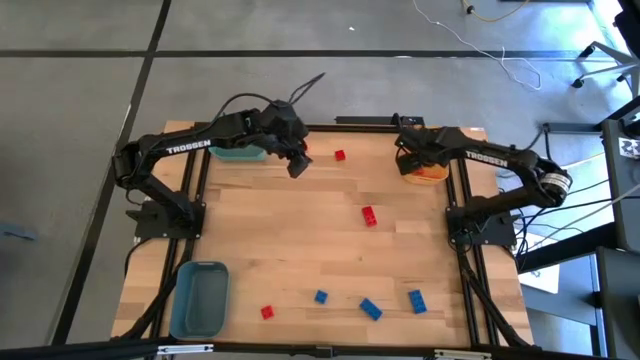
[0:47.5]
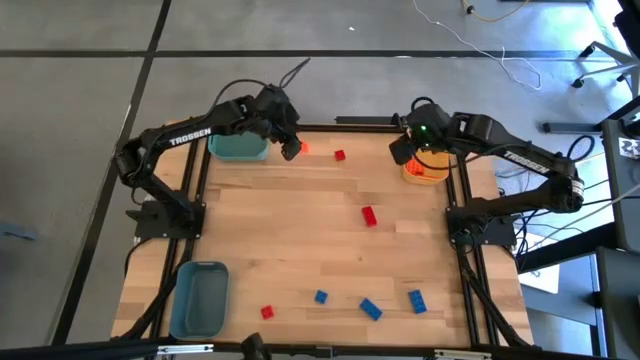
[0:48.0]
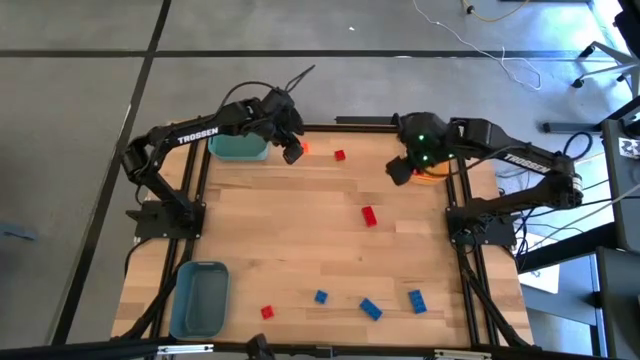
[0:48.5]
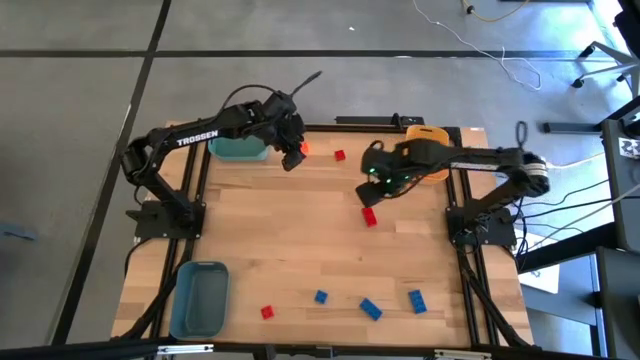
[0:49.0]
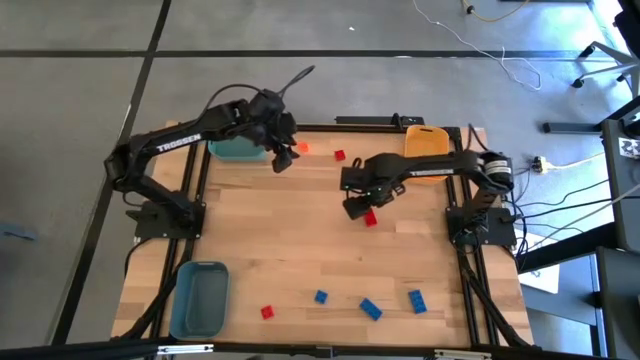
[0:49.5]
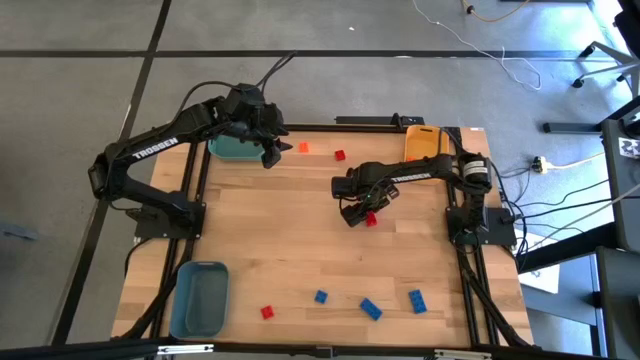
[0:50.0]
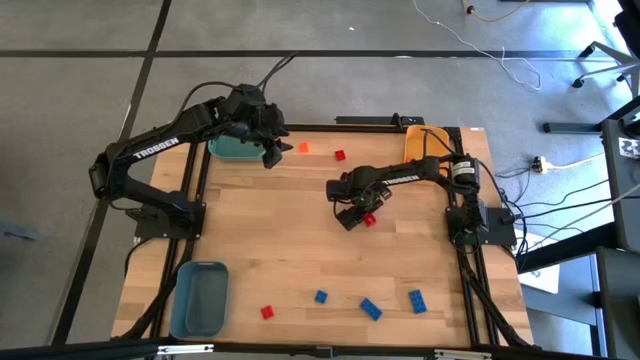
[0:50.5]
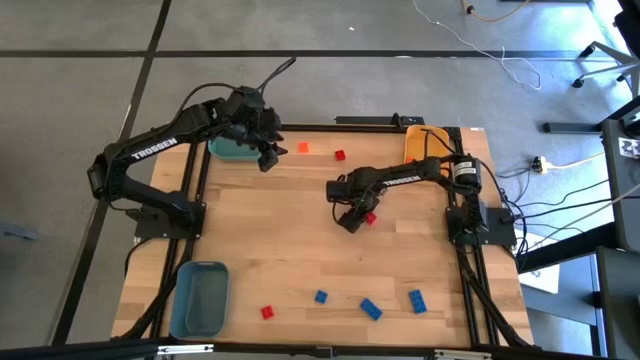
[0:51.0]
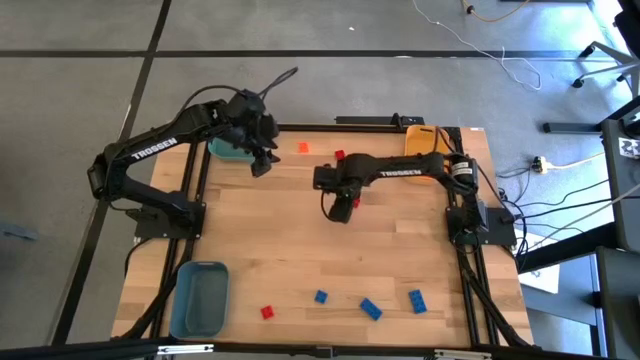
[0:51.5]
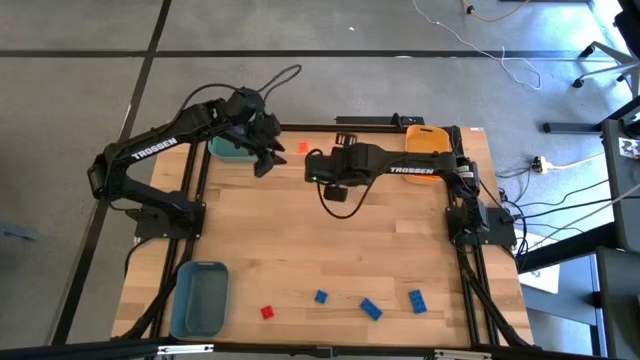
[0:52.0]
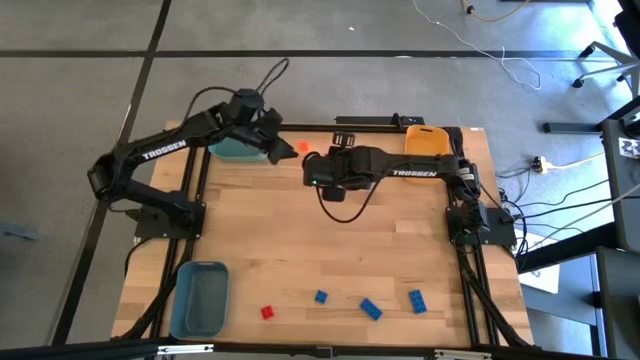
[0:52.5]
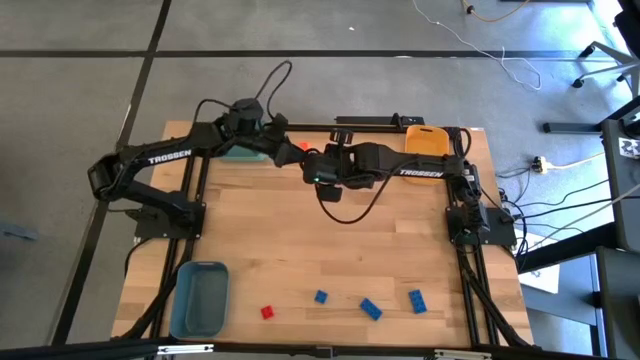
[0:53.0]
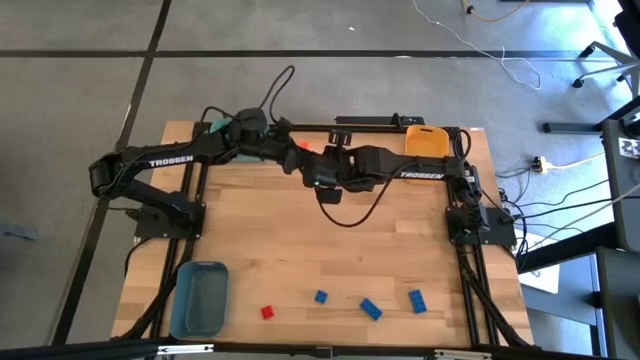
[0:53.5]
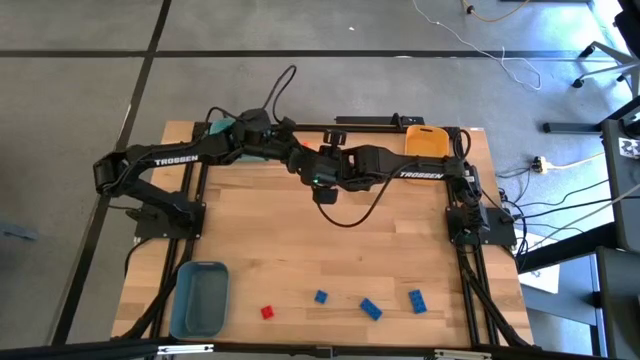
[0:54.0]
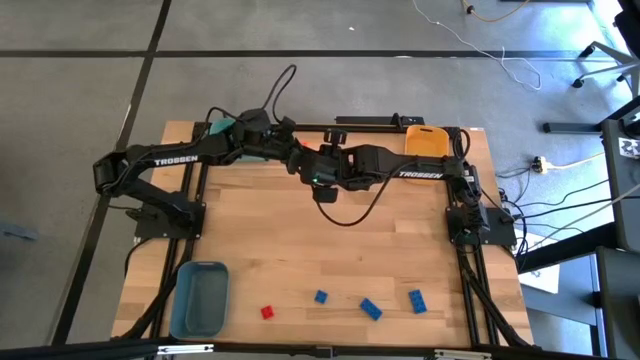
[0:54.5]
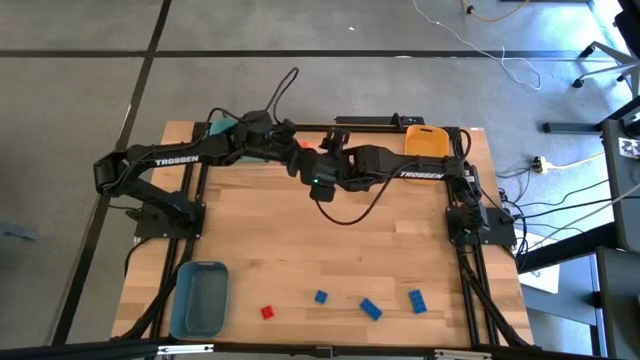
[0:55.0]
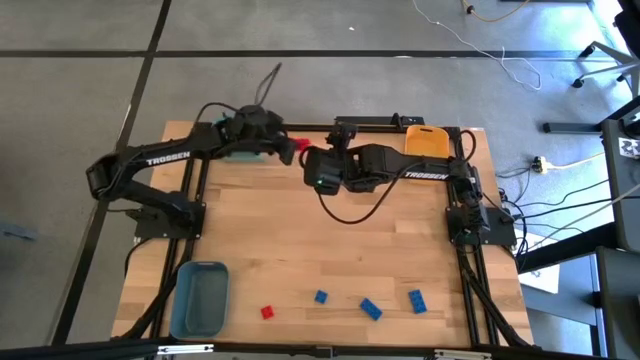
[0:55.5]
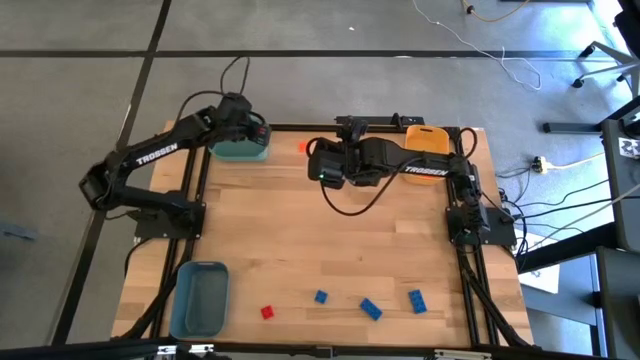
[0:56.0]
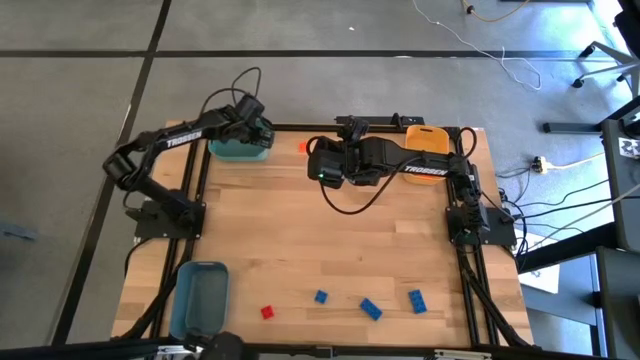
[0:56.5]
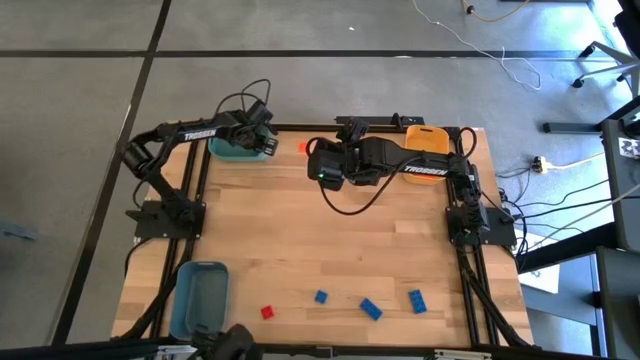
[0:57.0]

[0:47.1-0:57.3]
Task: Sort & place blocks by color
Put the red game piece into the green bin

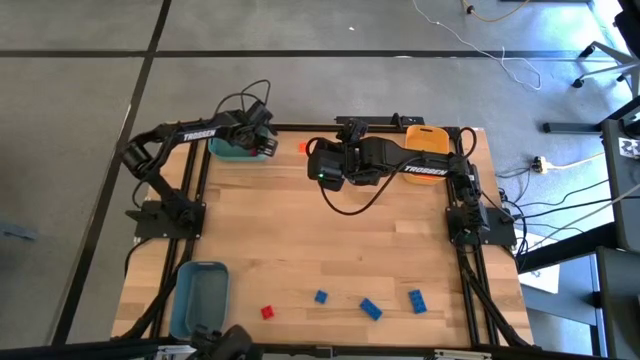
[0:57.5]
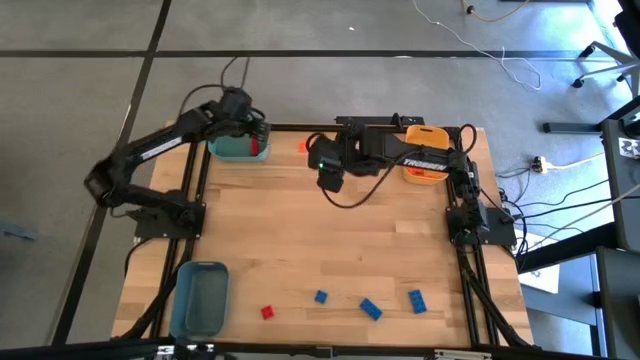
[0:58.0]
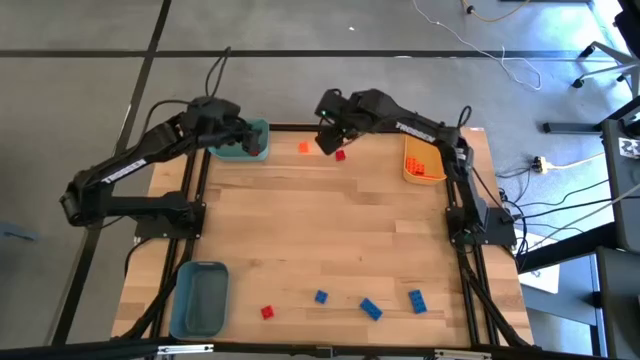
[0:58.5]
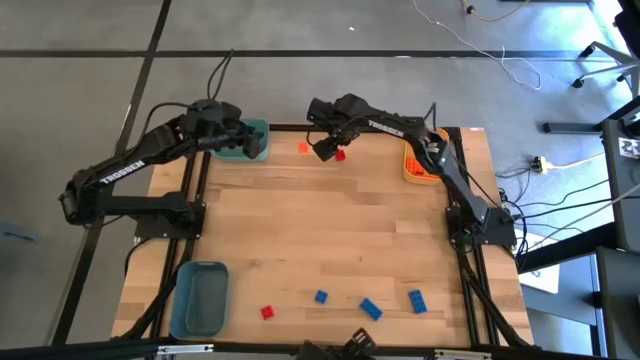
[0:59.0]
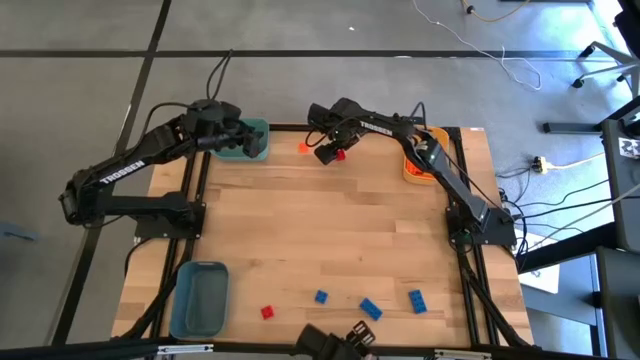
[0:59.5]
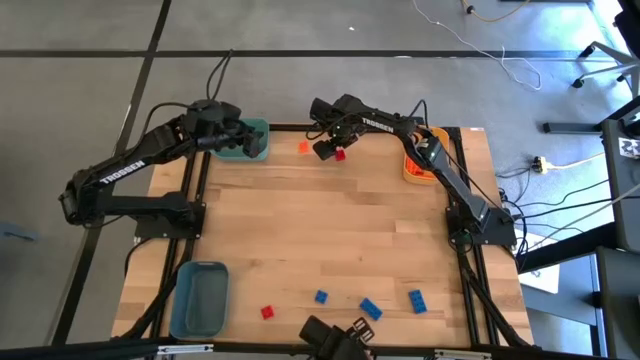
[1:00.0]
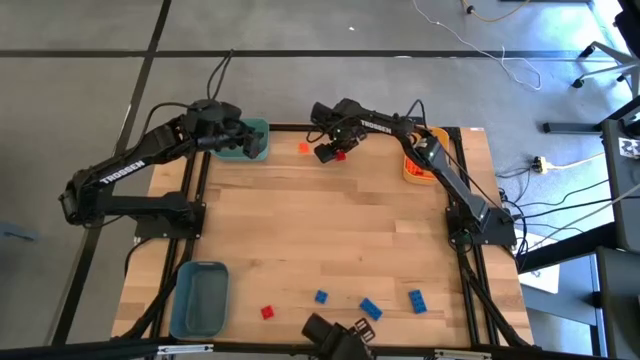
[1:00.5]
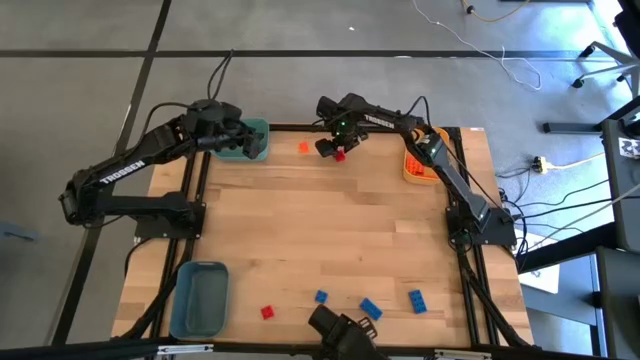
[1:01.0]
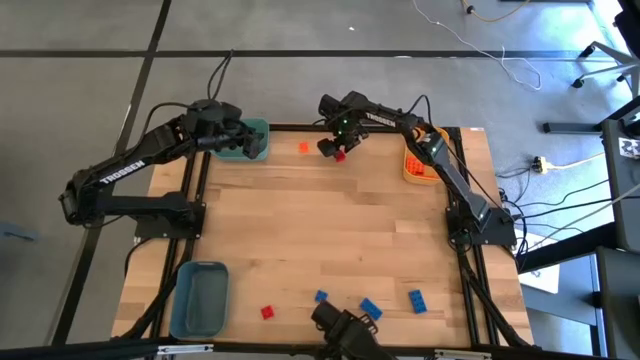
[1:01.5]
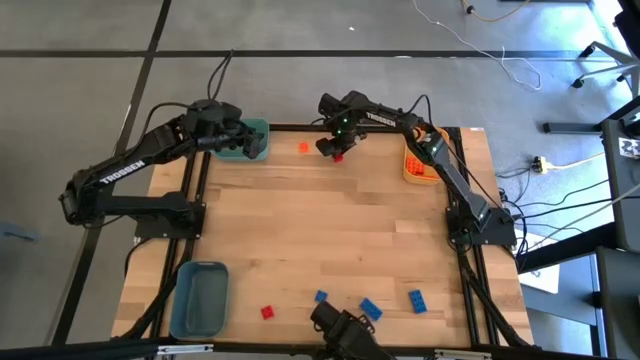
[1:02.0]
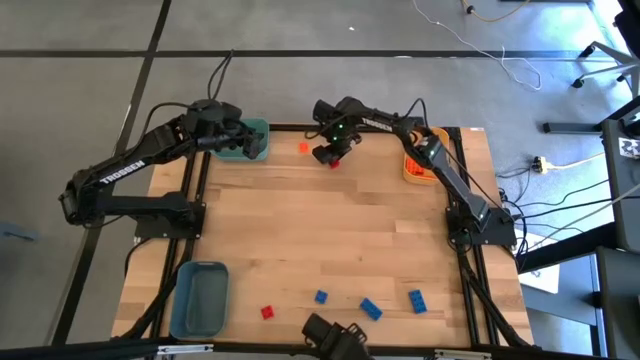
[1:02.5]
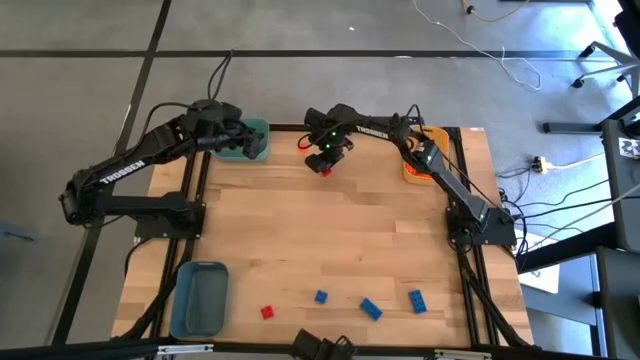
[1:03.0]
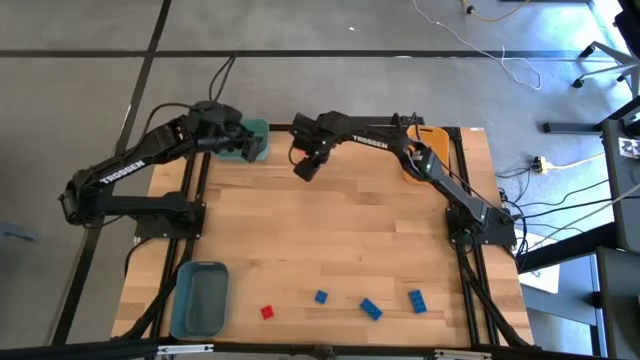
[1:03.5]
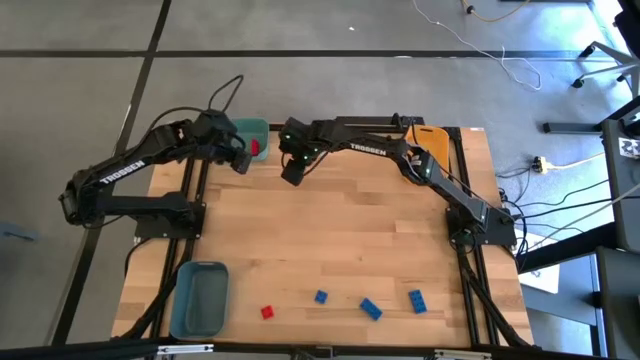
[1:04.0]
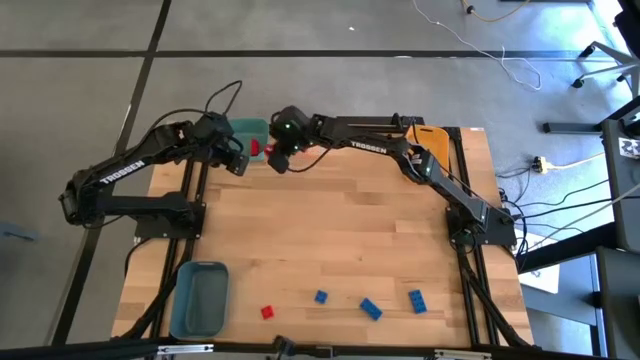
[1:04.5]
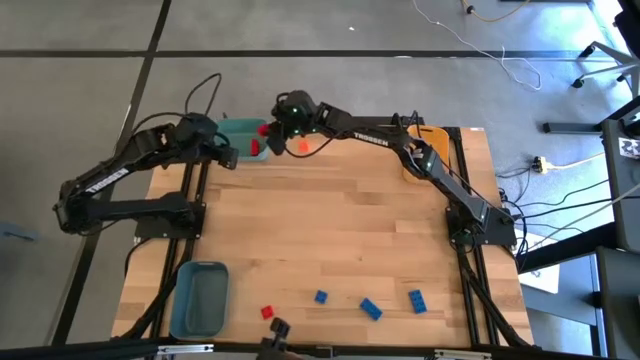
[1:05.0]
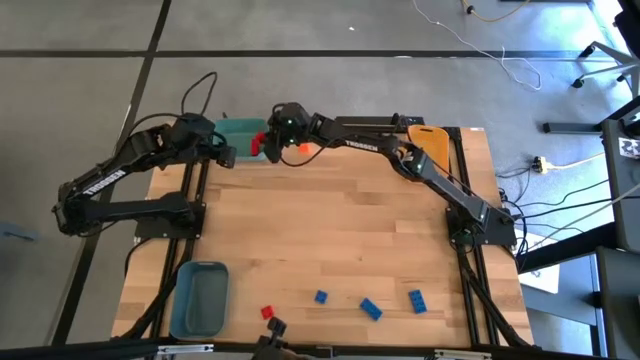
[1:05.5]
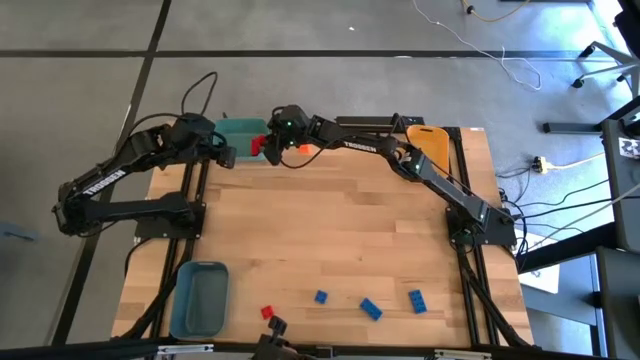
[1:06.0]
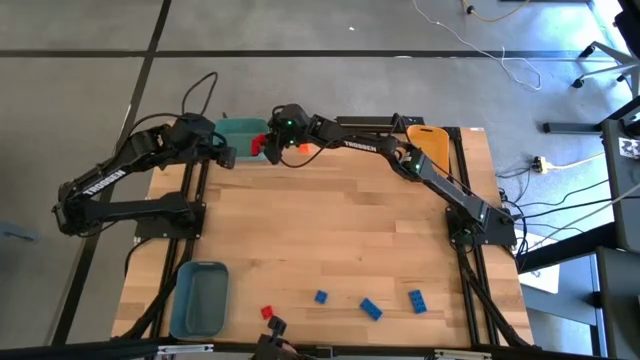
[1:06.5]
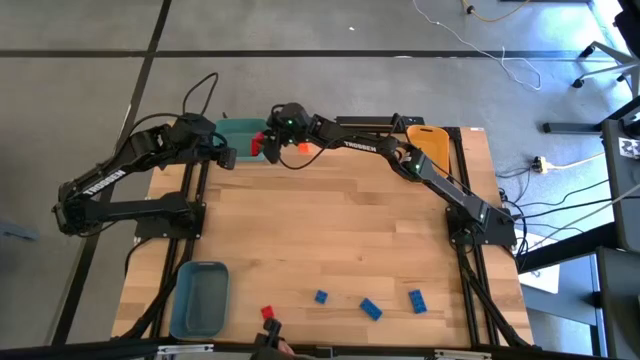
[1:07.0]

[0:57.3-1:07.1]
Put the red game piece into the green bin

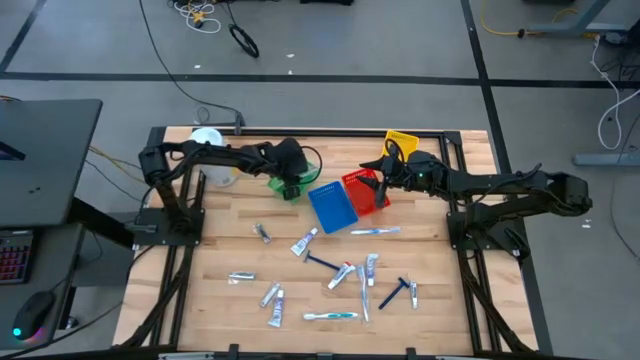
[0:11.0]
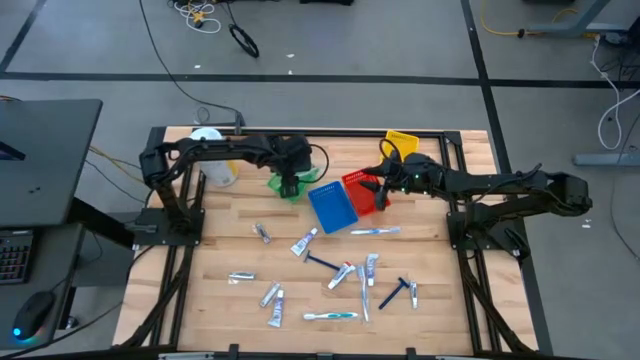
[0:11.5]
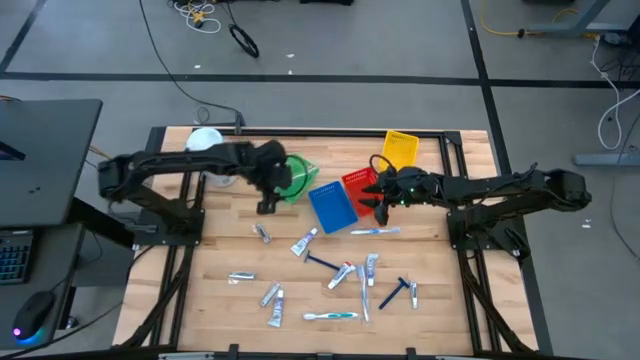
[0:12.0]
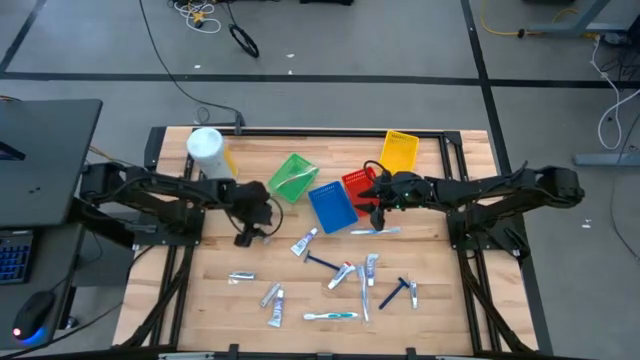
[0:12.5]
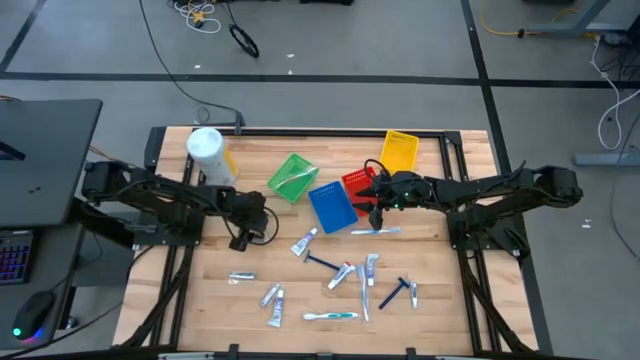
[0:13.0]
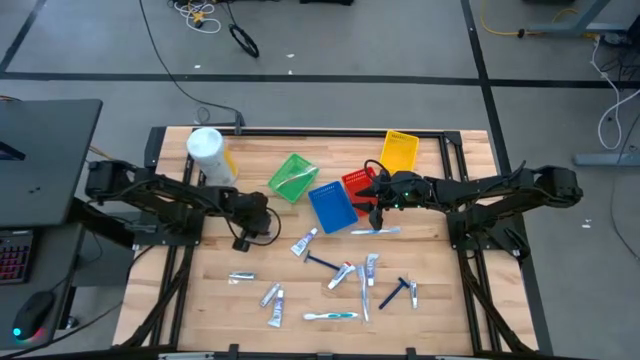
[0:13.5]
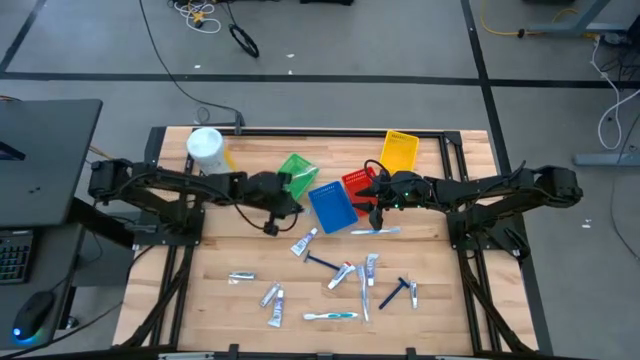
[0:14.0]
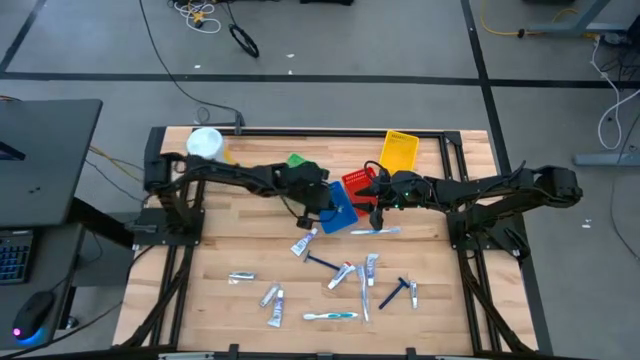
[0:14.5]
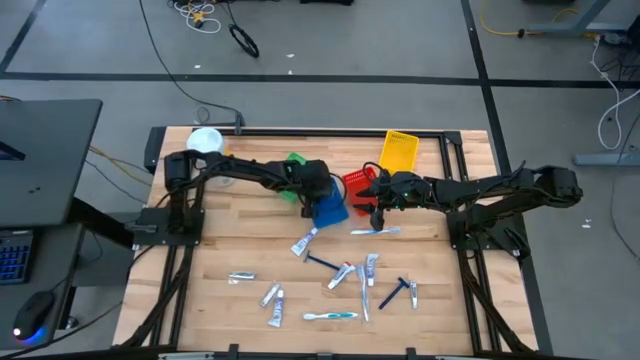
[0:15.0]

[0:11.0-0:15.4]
Task: Pick & Place Travel size toiletries
Put the top left nail clipper into the blue bin
